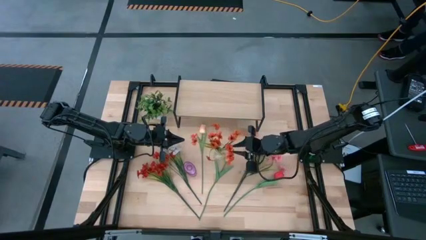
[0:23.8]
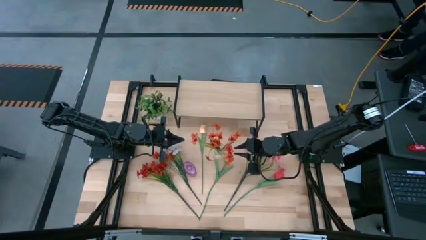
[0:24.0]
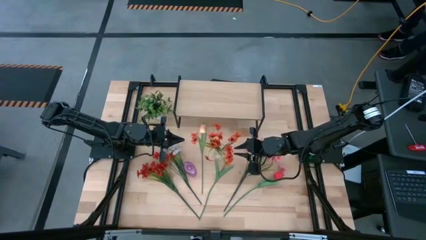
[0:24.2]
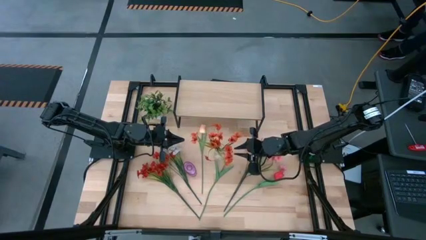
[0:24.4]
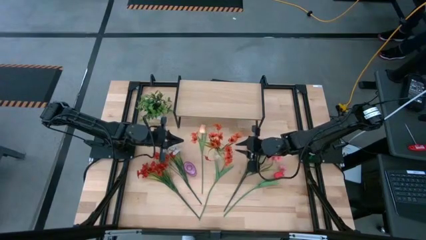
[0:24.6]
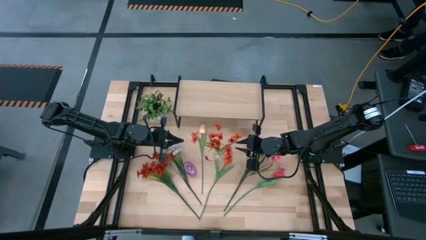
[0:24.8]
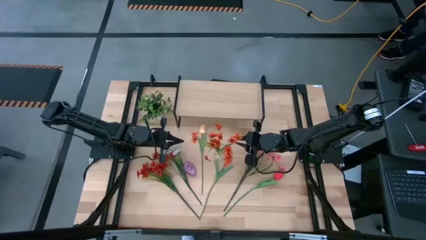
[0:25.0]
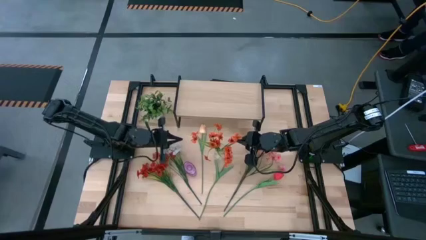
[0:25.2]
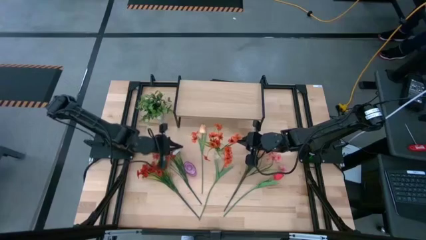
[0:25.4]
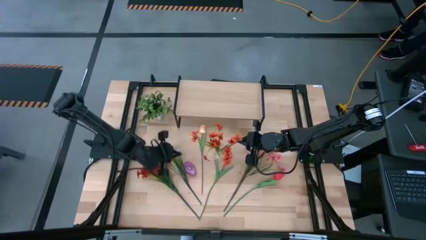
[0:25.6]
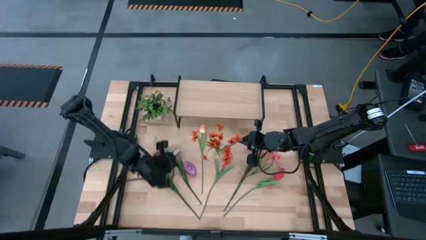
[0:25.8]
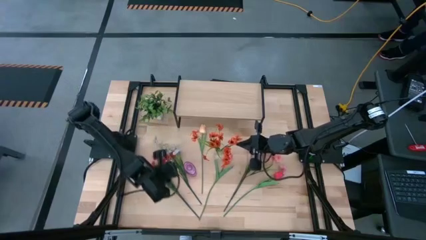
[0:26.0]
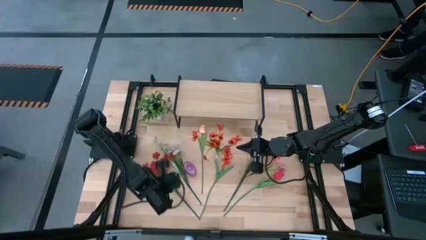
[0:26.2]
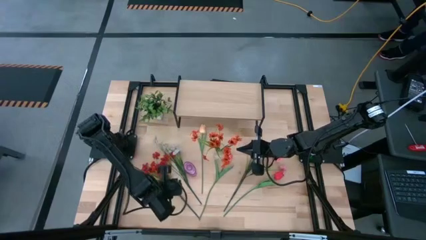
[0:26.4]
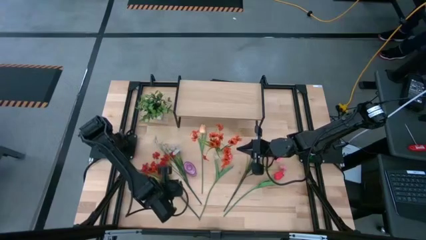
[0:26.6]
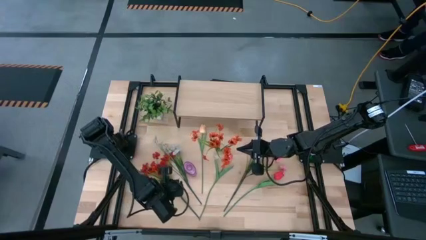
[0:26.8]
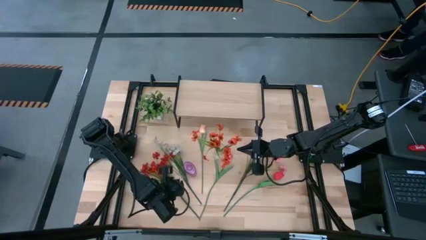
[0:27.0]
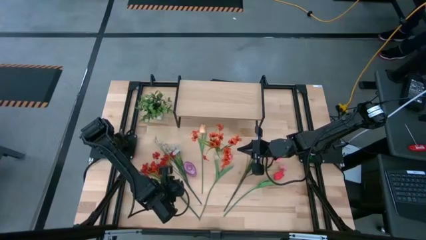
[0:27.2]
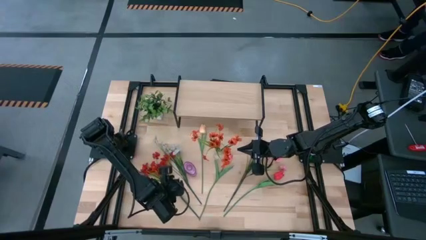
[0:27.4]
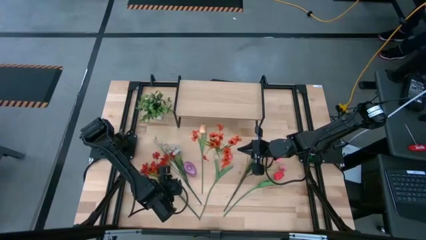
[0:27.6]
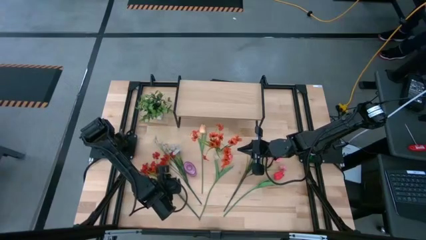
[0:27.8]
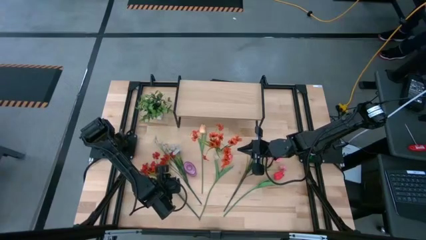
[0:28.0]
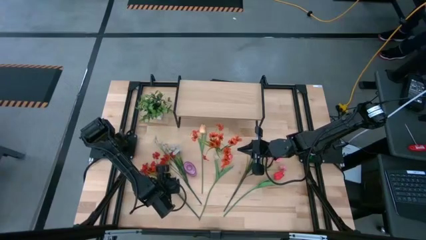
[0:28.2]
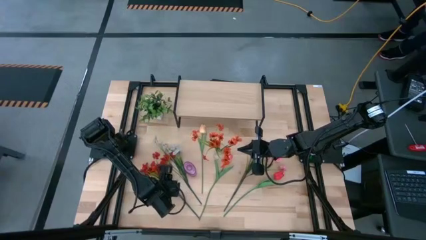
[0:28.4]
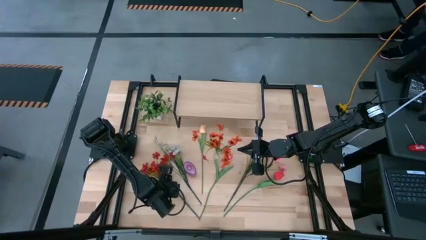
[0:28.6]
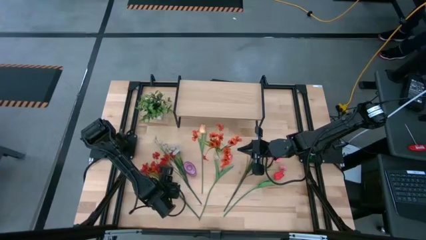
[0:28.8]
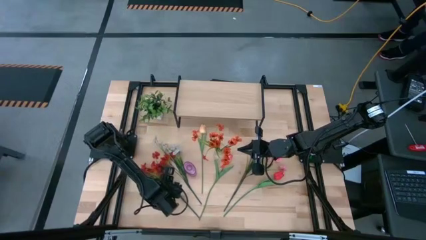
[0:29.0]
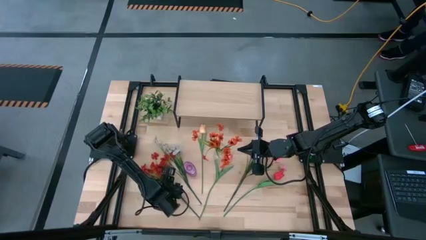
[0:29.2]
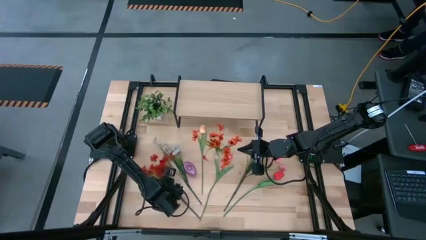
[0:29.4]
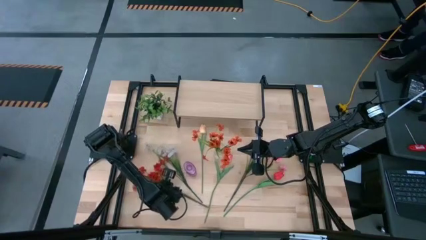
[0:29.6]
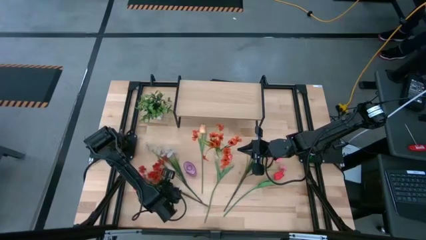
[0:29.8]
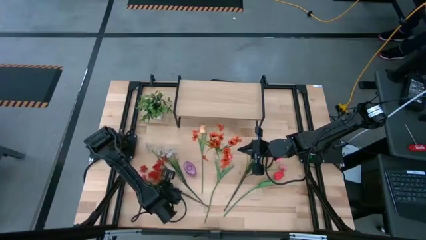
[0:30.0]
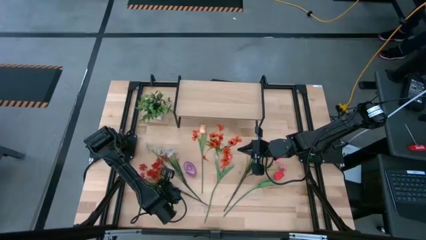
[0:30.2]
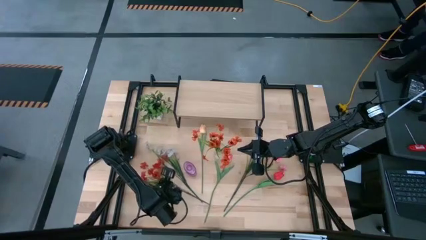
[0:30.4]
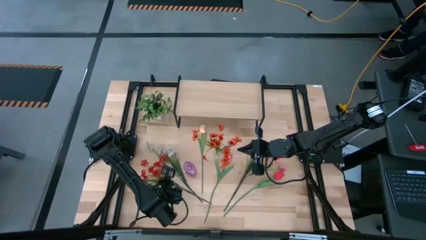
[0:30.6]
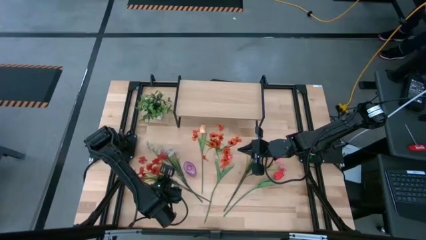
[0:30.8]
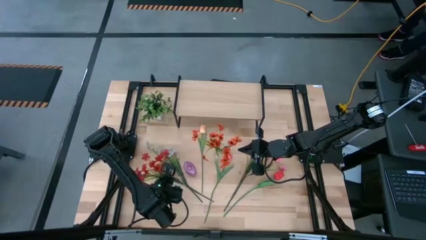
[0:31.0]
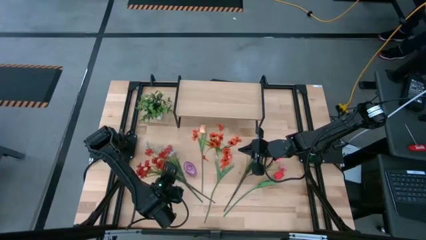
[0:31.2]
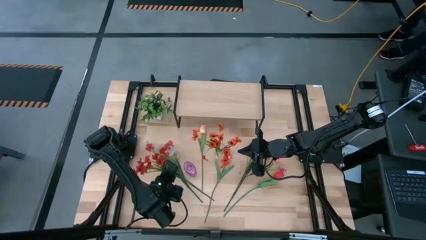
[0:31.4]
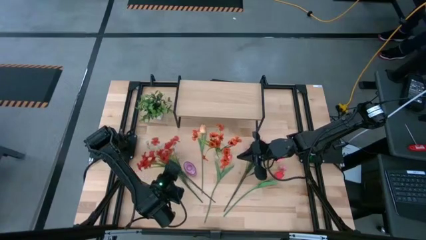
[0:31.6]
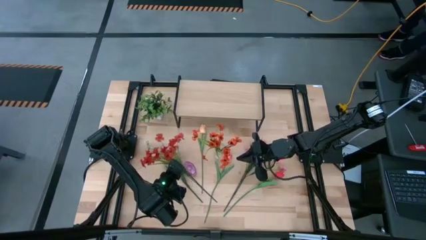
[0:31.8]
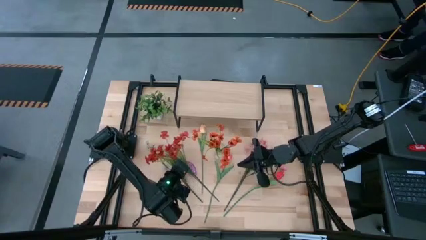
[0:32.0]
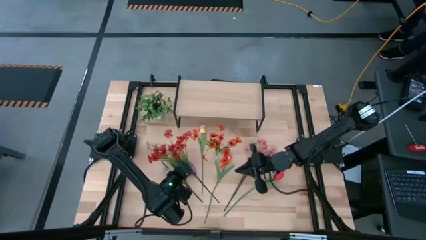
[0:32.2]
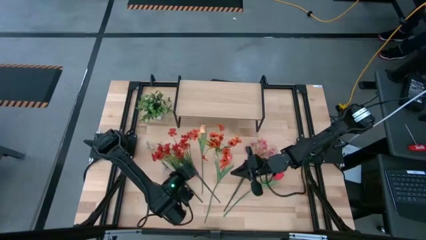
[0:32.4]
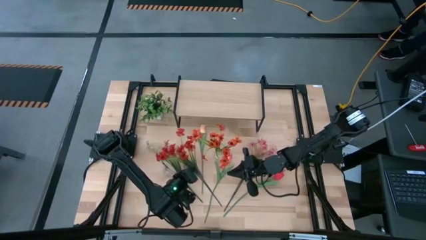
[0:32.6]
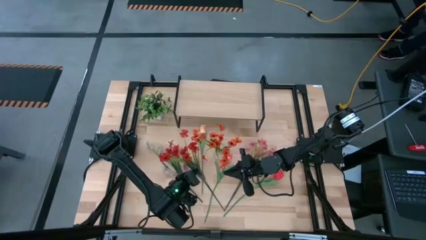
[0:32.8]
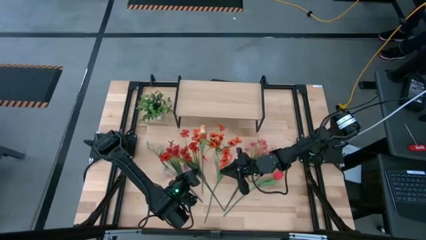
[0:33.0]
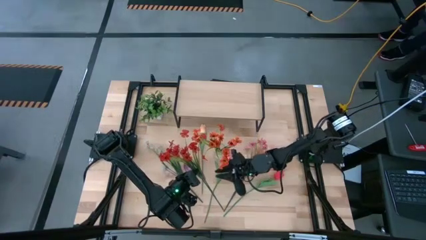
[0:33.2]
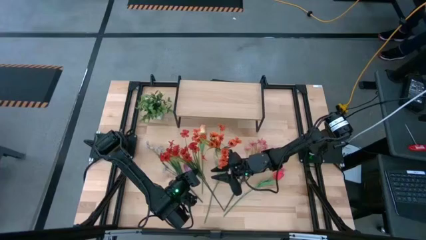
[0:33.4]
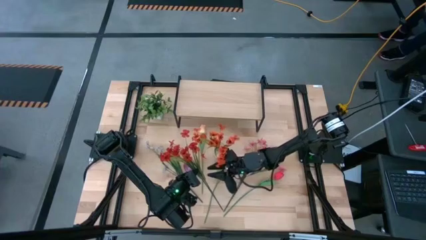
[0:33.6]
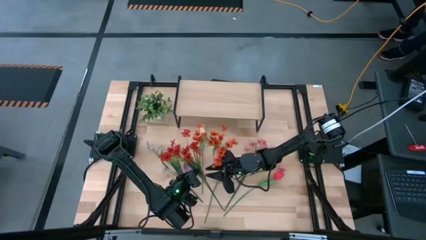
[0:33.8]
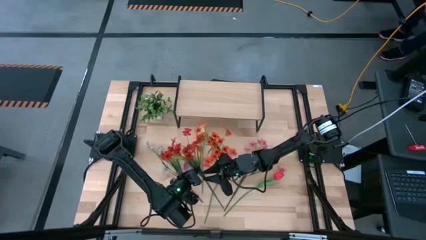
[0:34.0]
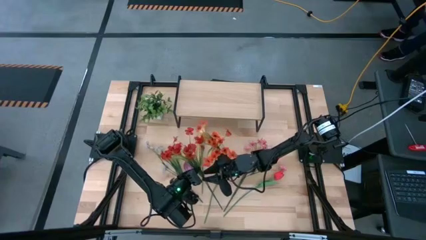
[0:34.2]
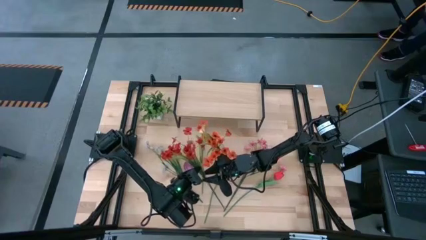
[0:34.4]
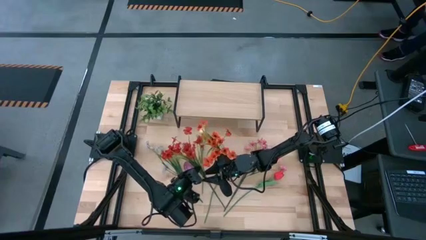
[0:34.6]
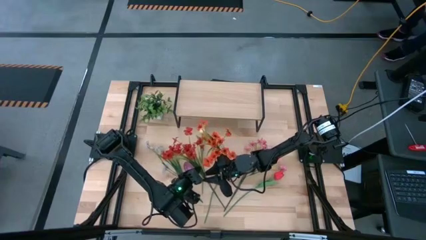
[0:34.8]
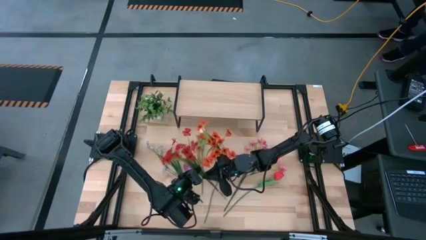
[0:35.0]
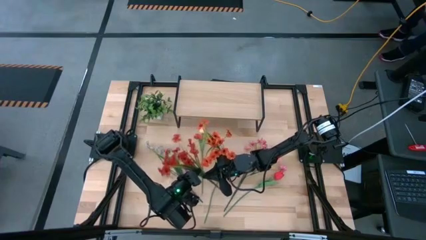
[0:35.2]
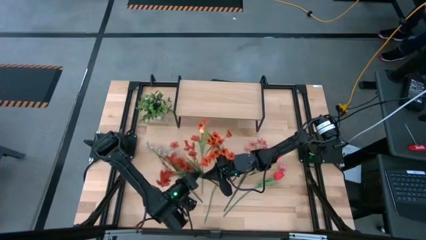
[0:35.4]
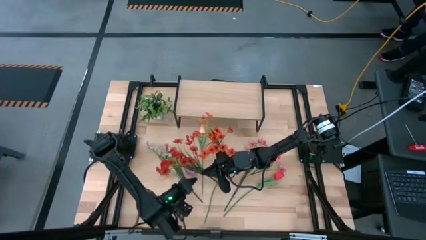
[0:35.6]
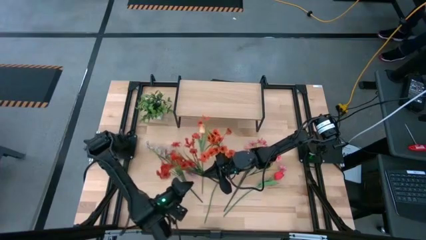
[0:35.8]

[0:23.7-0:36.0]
Task: Pick and place flowers into a vace then onto a shelf
Put the orange flowers into the transparent vase

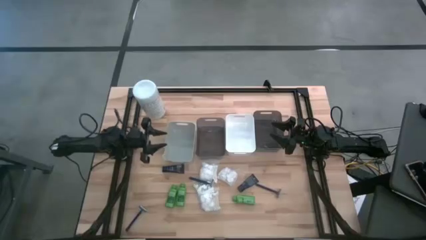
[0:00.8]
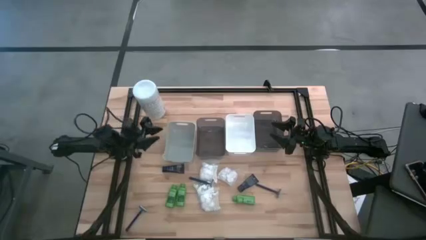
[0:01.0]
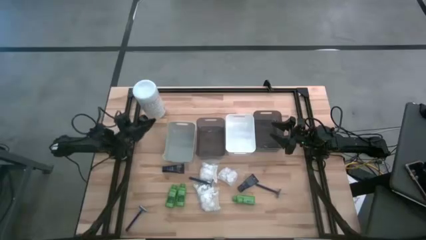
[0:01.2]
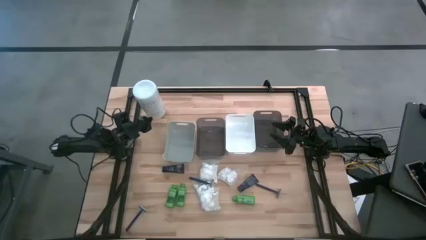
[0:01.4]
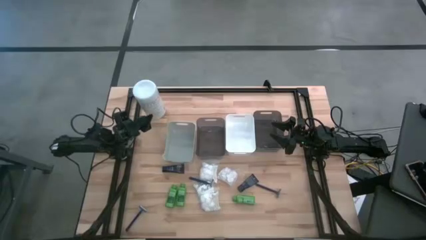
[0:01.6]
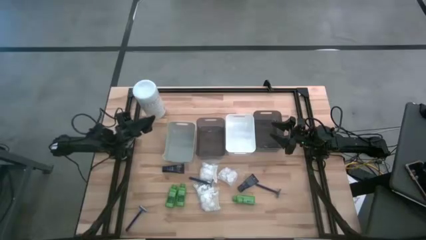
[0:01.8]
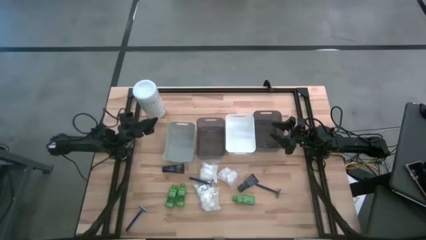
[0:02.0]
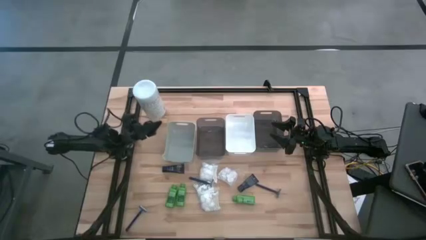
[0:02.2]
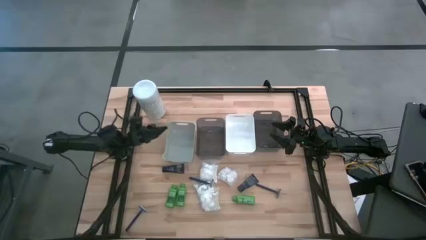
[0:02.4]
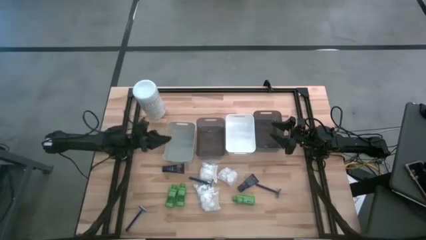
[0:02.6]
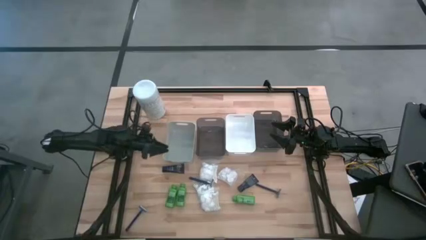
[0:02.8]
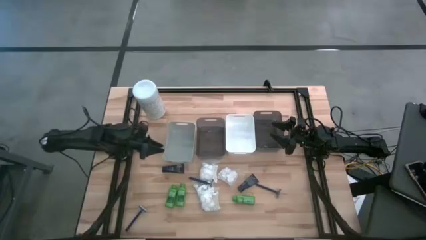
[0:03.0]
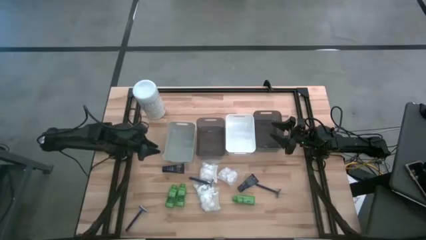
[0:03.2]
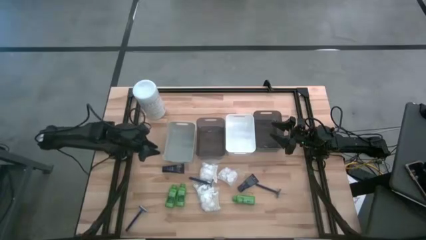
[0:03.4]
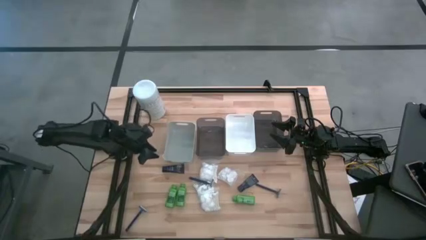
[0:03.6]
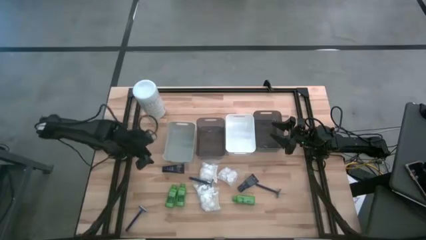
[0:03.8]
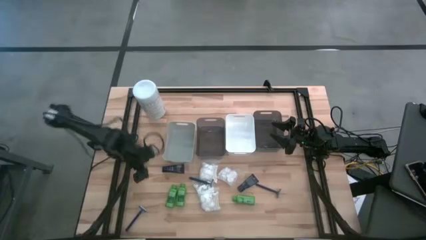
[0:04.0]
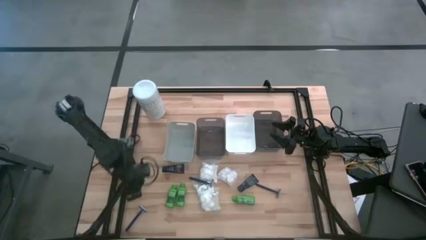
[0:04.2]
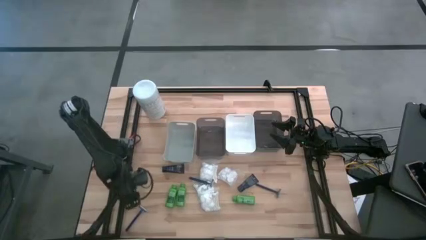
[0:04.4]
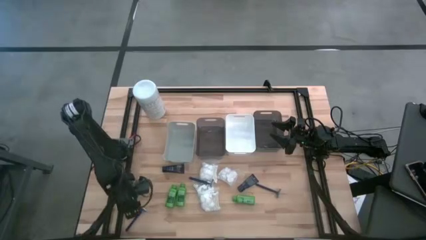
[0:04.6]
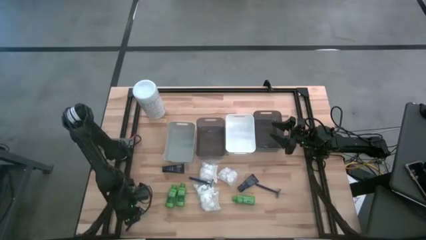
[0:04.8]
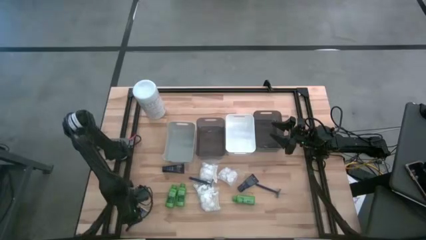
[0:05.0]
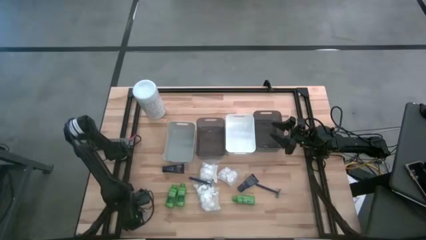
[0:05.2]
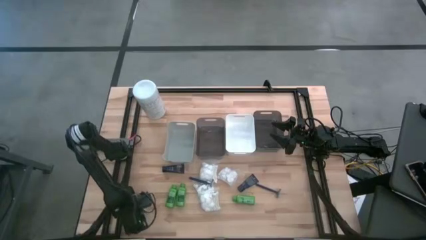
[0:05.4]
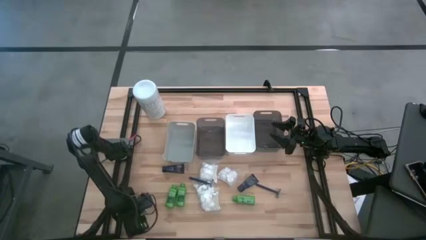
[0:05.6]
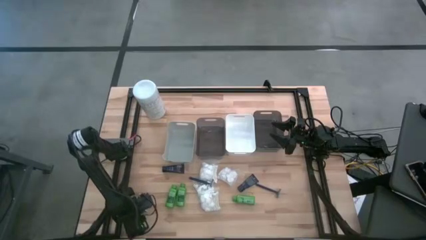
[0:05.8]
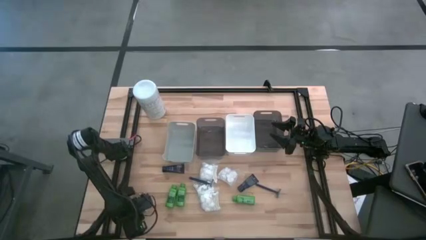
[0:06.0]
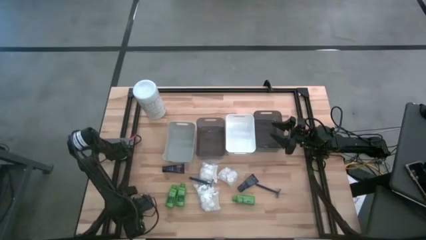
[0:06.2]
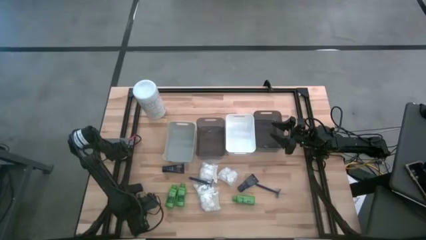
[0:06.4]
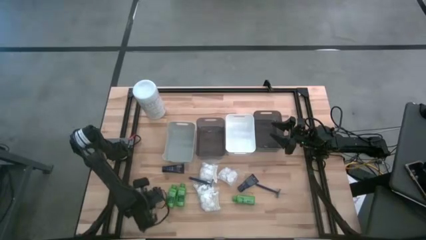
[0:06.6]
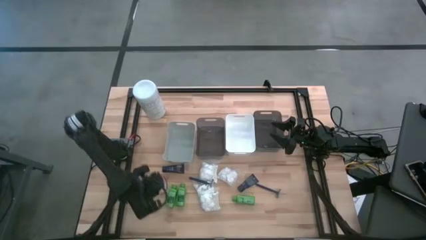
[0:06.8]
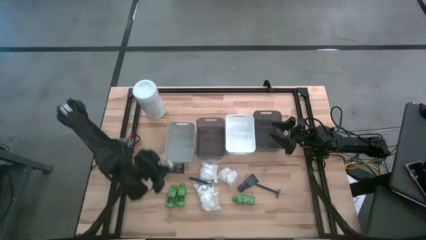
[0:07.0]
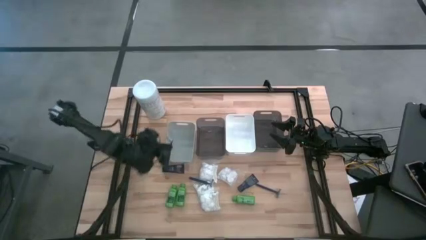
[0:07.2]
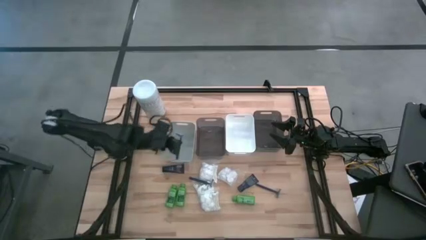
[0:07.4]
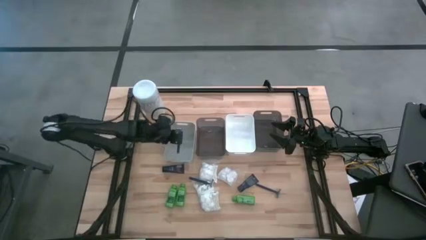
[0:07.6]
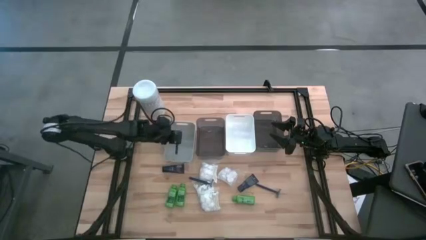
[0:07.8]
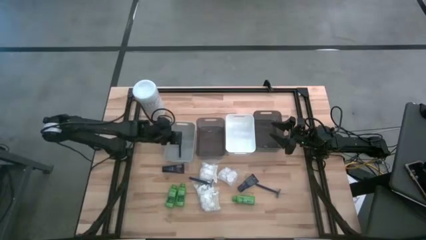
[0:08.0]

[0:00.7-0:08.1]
Task: Pick & Place Travel size toiletries
Put the bottom left razor into the gray bin
